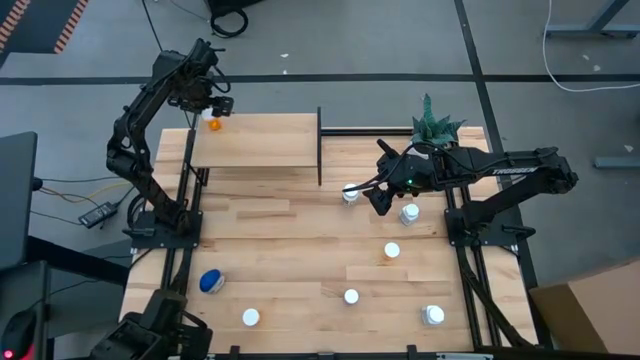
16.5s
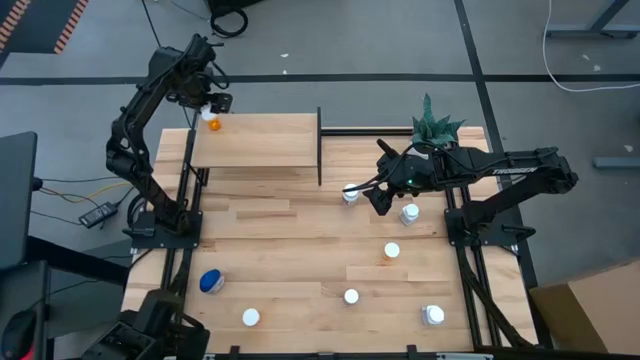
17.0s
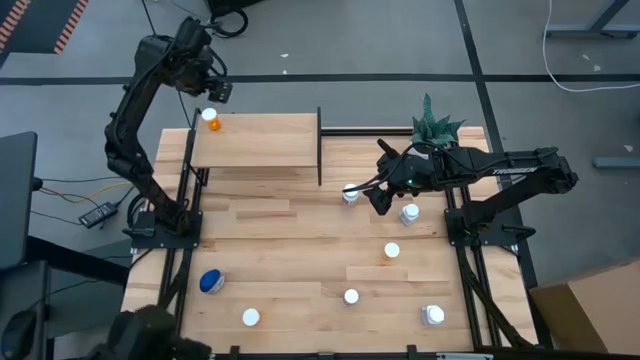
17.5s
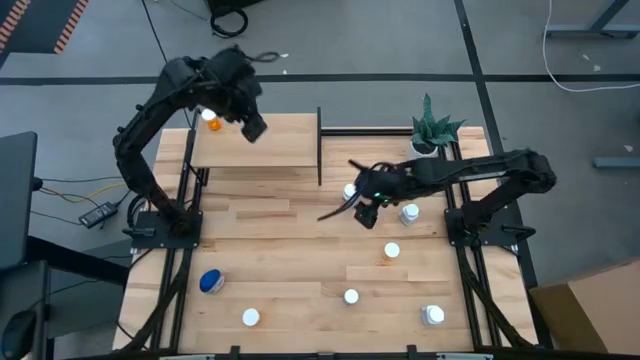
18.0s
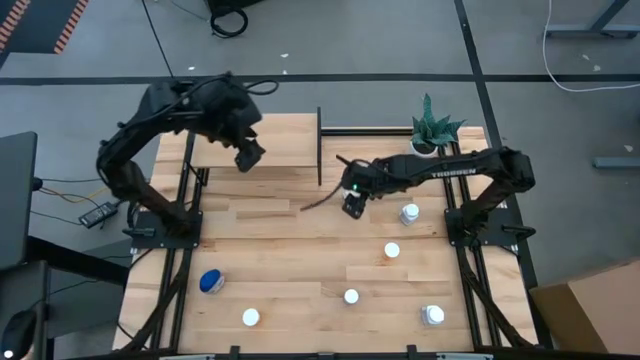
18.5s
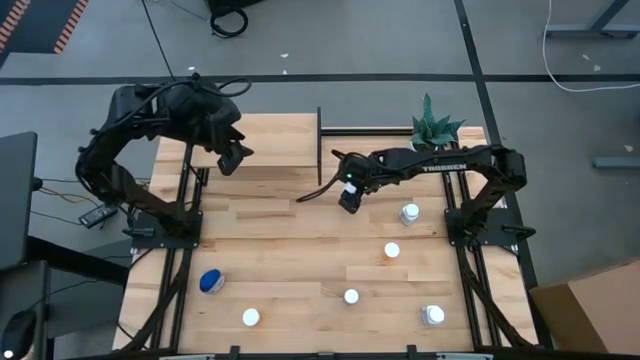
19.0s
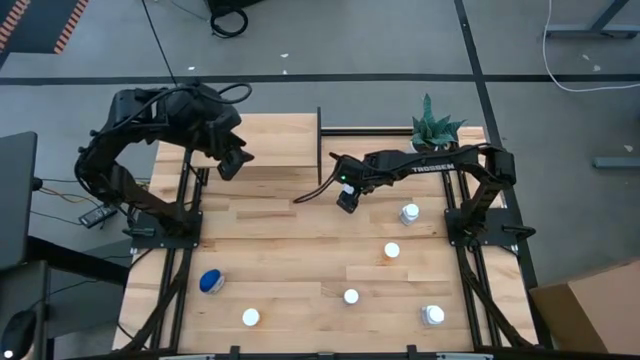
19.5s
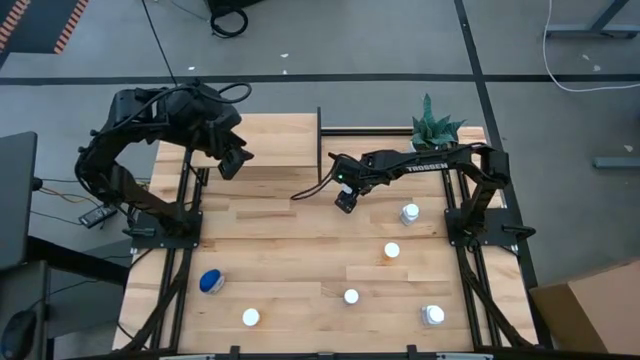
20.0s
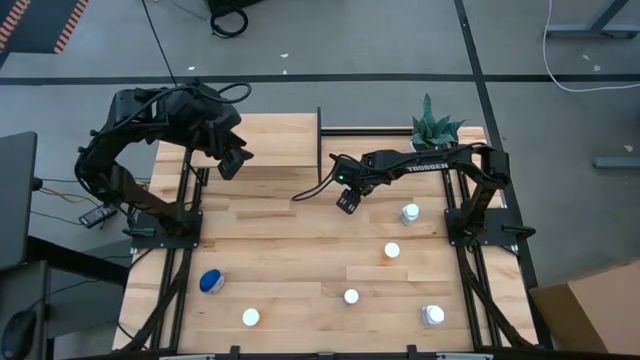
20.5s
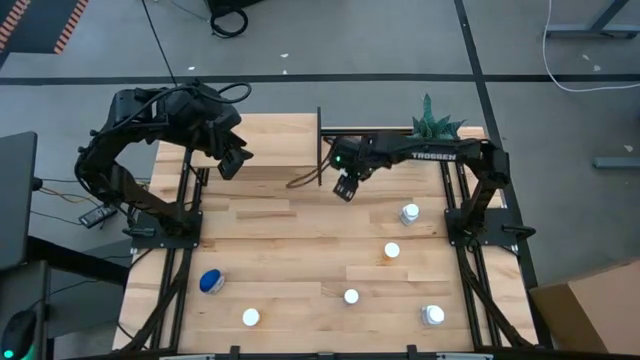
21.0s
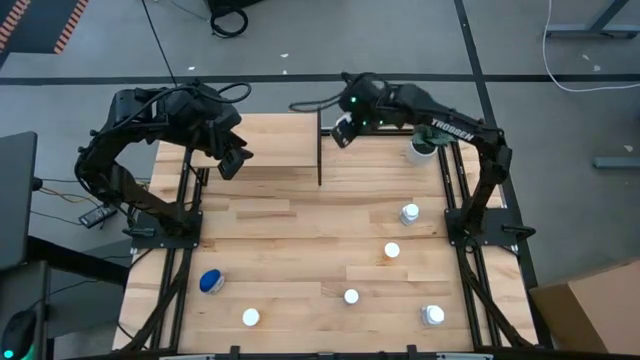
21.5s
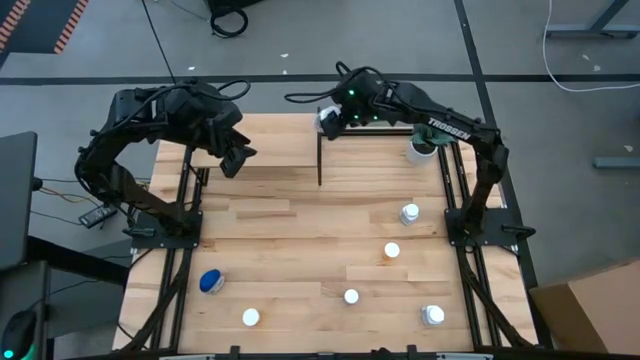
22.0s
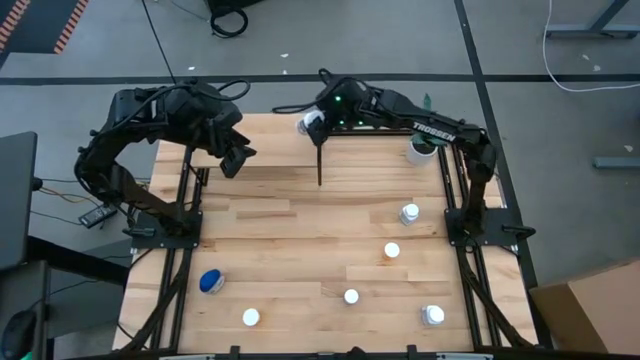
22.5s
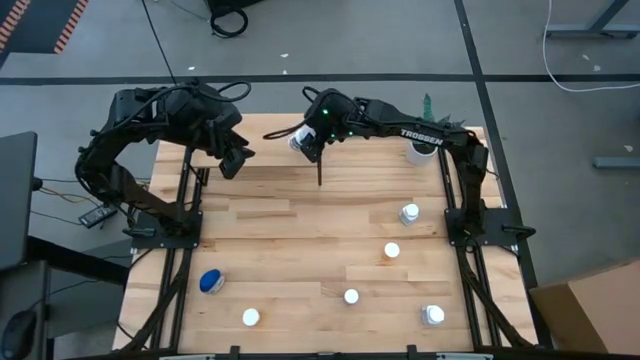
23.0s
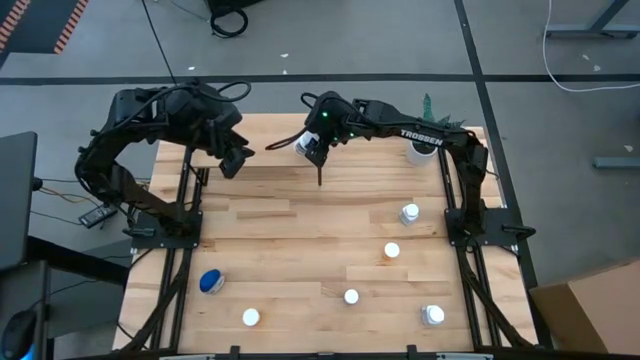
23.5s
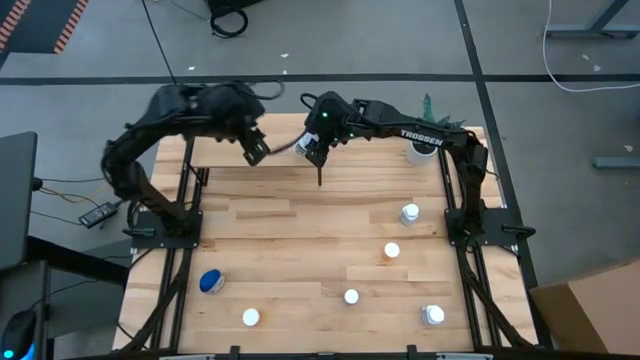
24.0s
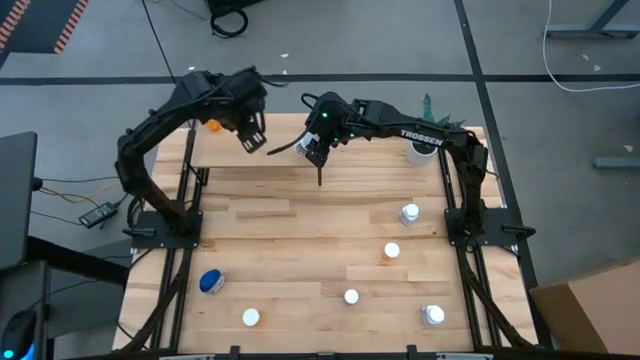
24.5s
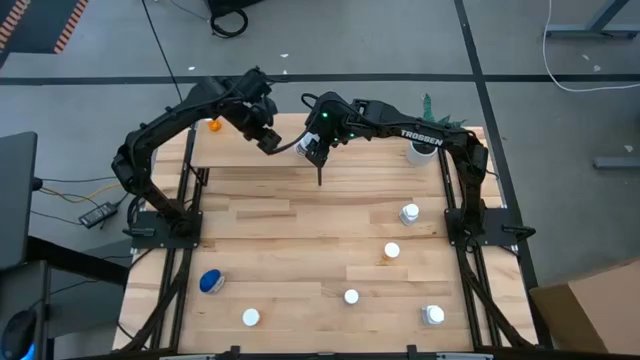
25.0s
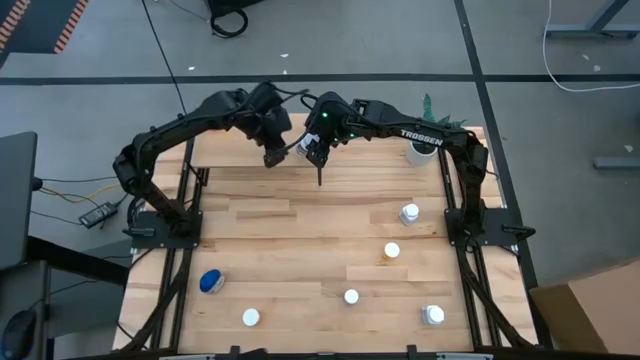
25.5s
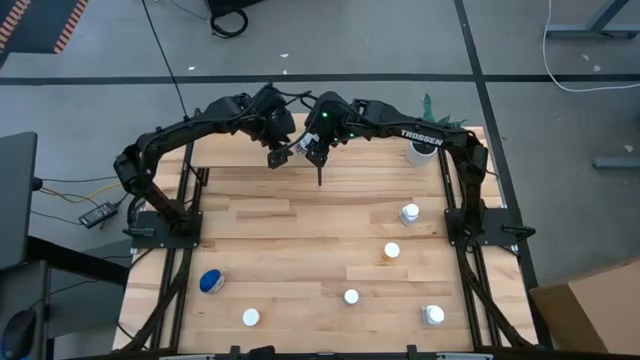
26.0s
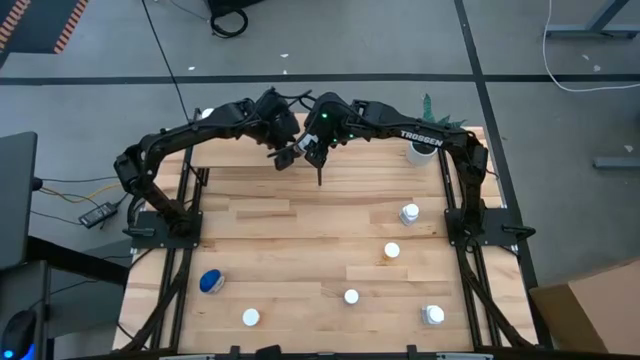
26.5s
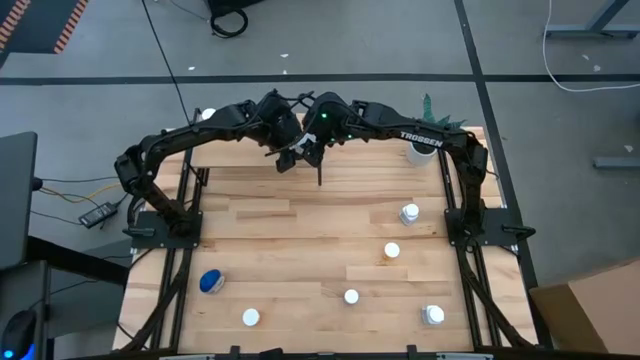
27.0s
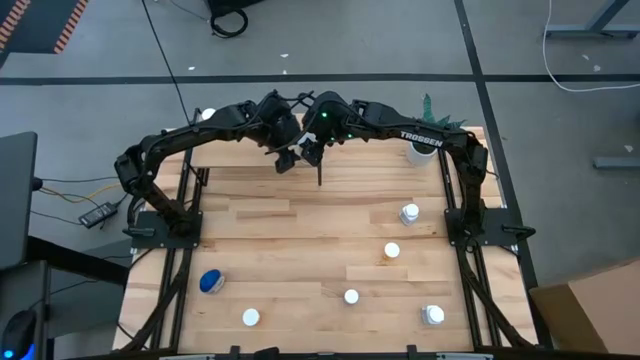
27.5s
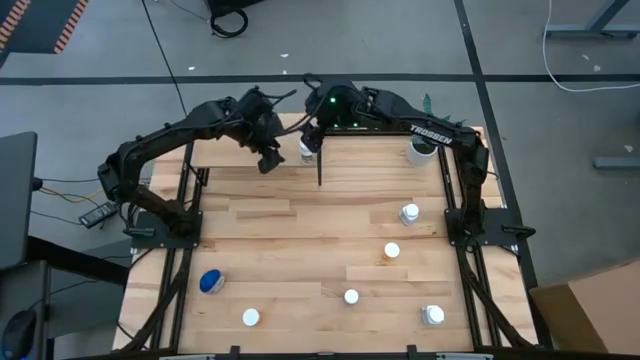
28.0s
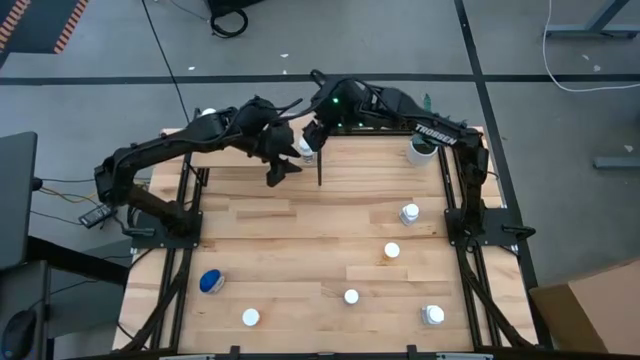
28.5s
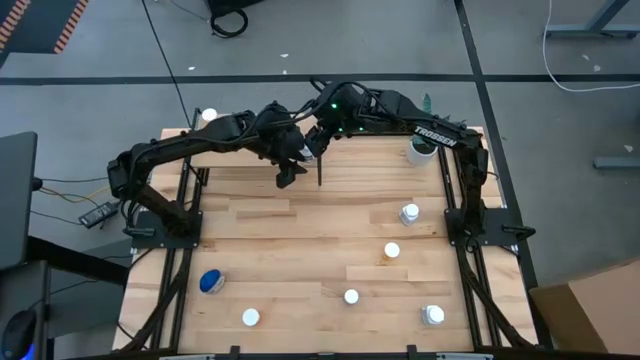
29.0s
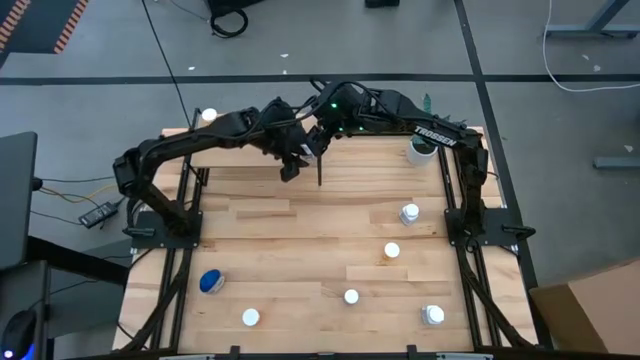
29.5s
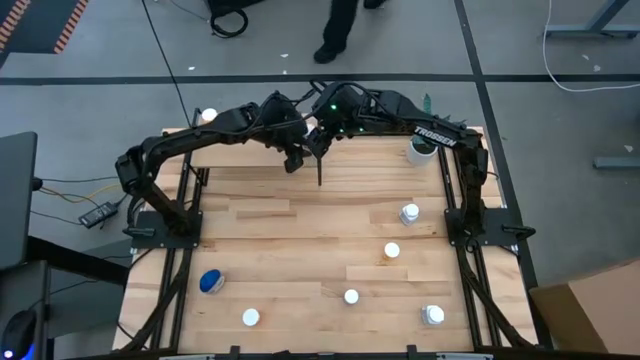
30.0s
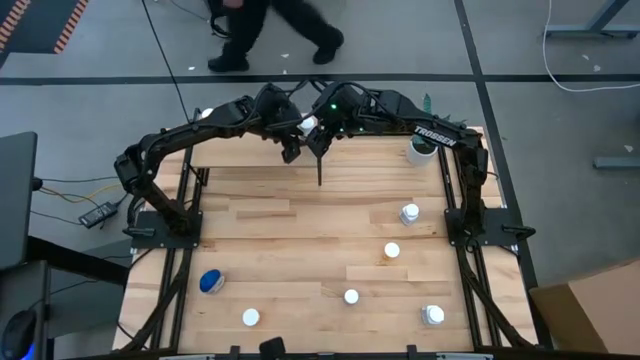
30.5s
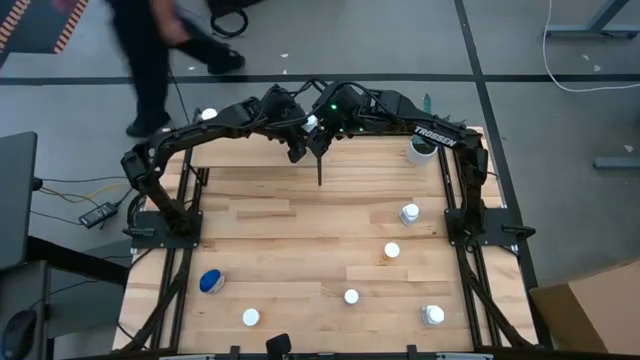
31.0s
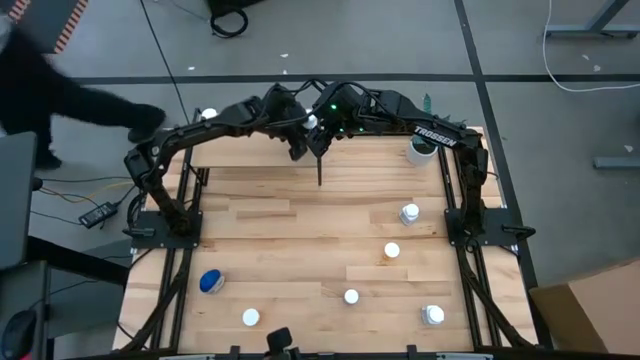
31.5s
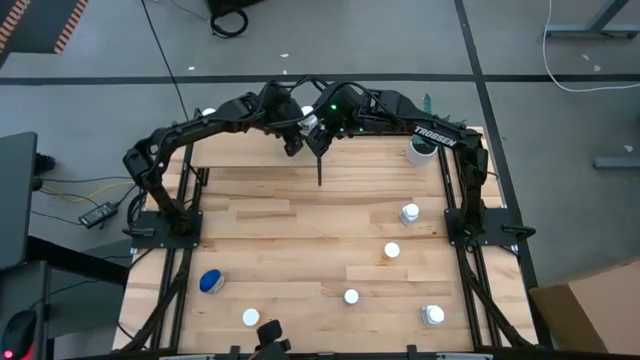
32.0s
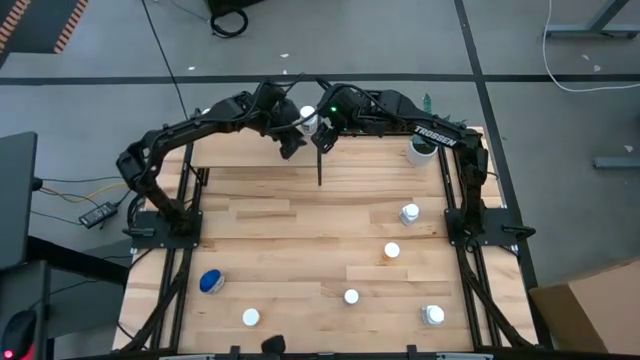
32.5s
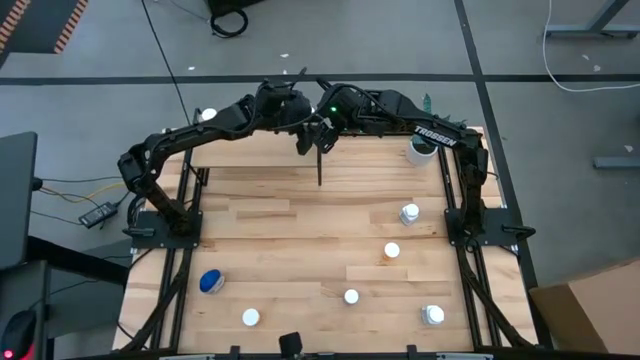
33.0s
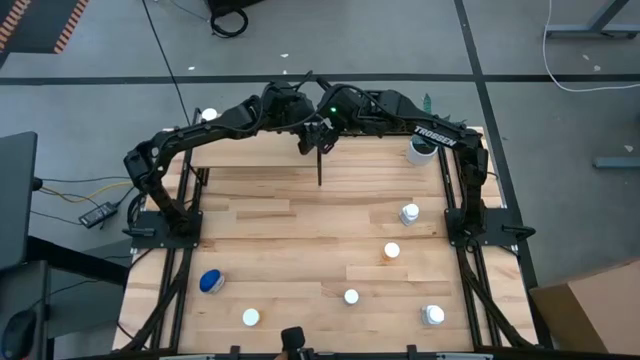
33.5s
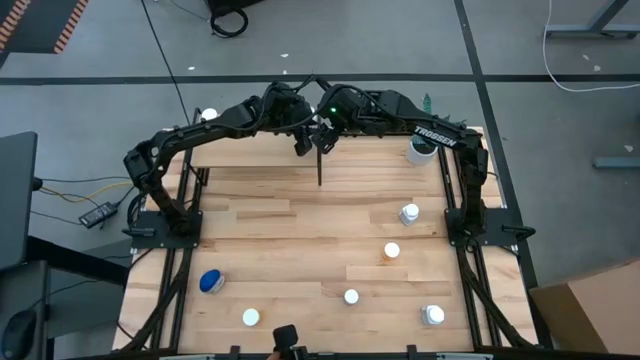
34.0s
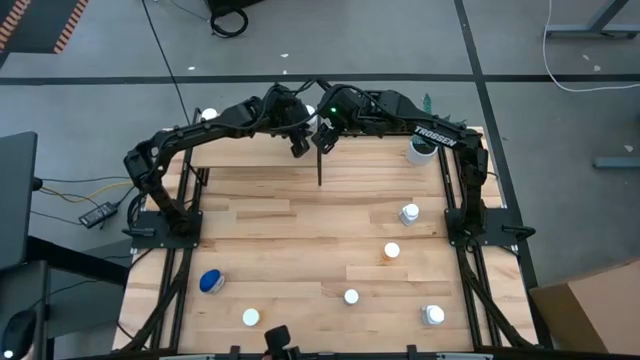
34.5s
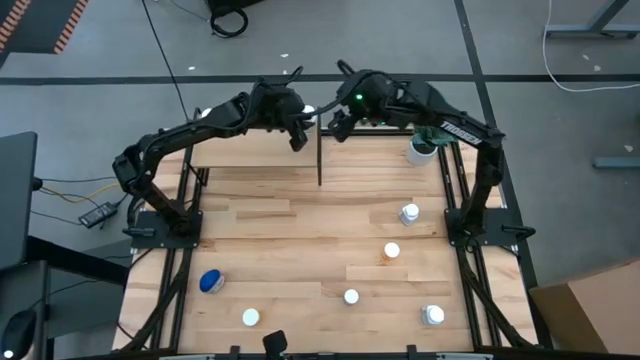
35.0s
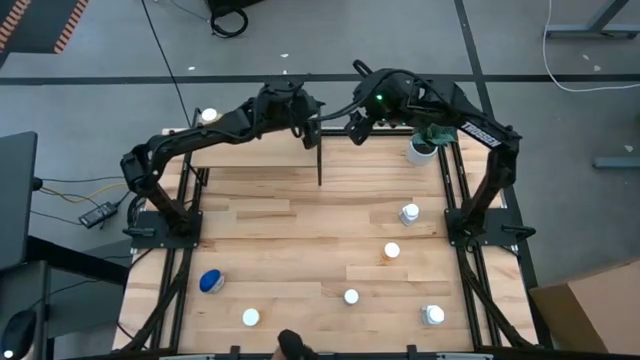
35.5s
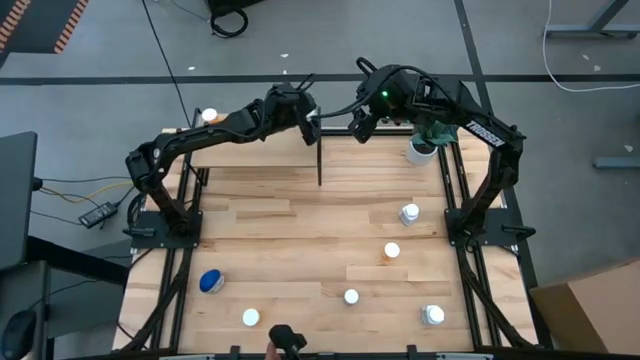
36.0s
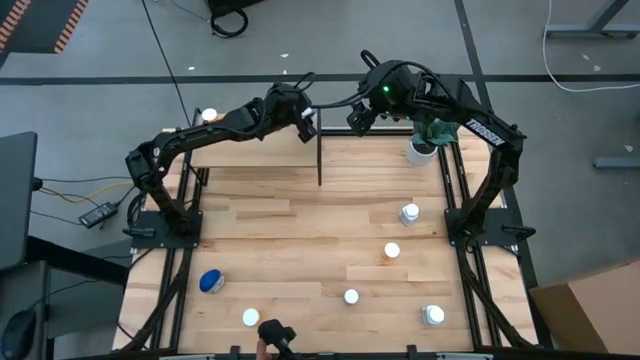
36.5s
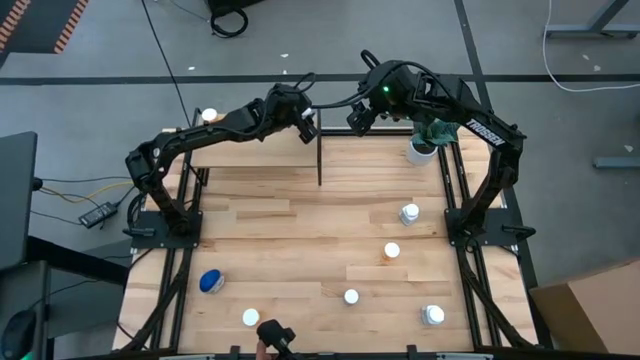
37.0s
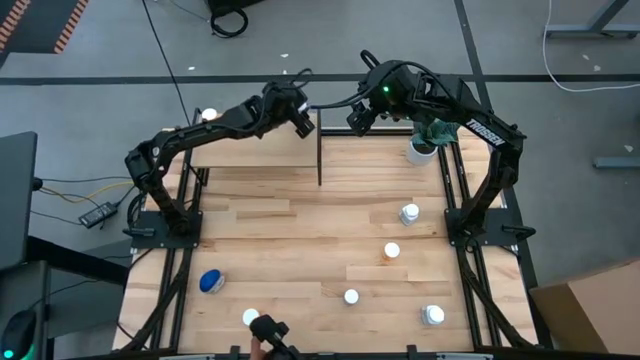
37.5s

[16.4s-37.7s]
Task: Pick and place medicine bottles onto shelf by color
Put the white pill bottle on the shelf
